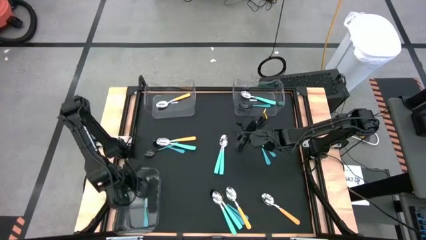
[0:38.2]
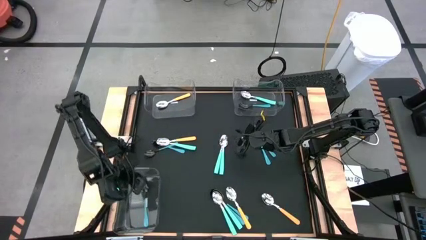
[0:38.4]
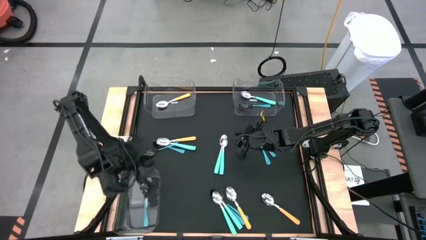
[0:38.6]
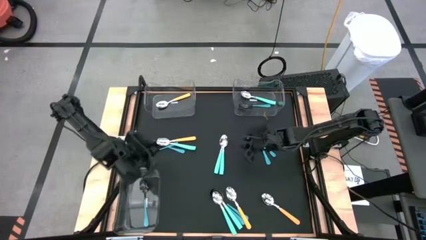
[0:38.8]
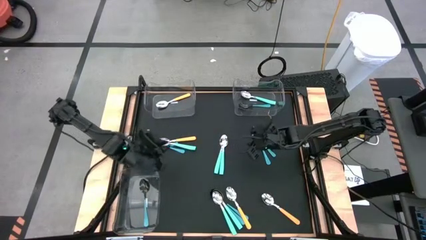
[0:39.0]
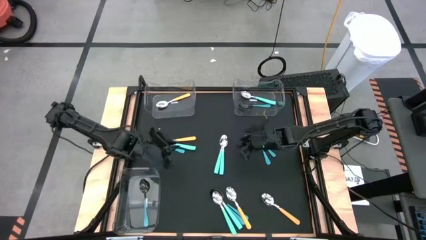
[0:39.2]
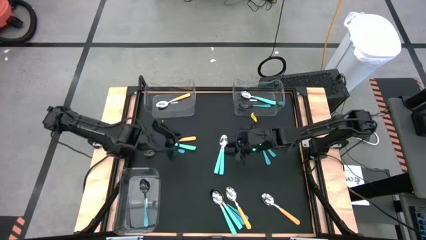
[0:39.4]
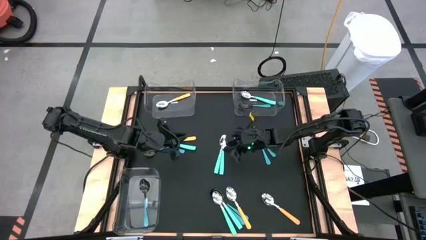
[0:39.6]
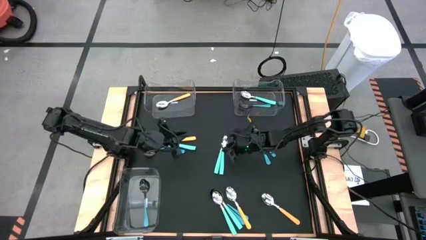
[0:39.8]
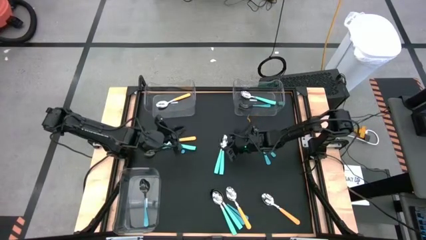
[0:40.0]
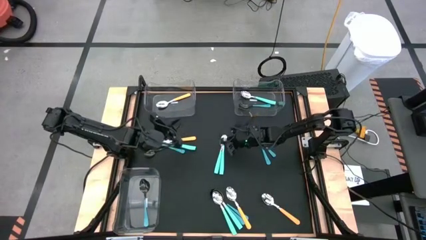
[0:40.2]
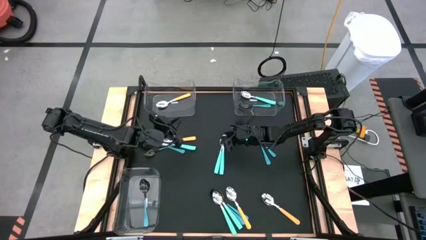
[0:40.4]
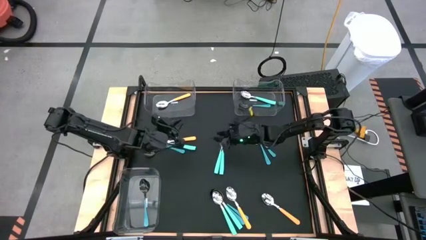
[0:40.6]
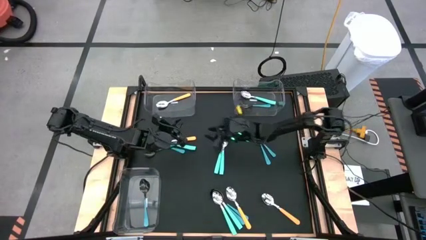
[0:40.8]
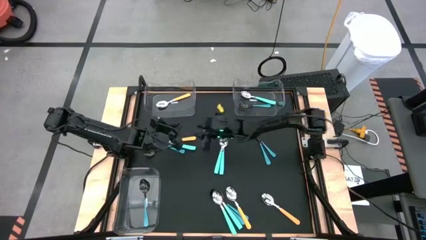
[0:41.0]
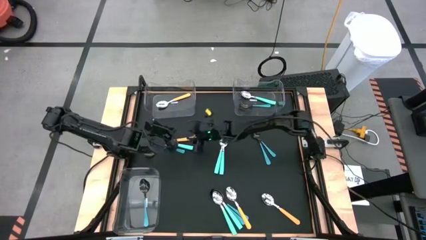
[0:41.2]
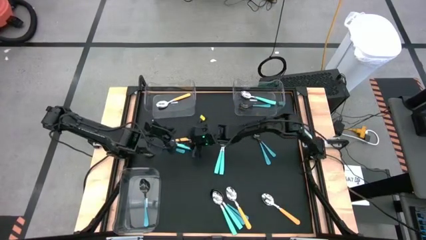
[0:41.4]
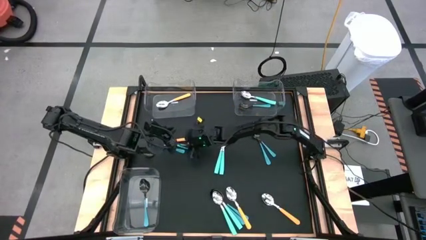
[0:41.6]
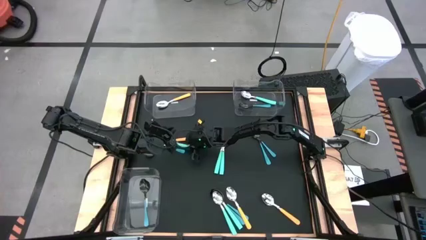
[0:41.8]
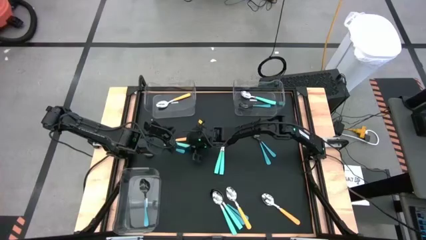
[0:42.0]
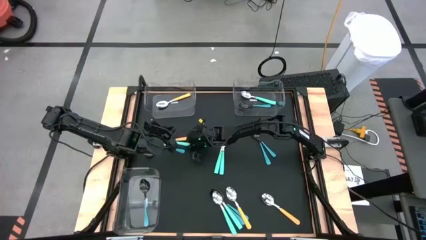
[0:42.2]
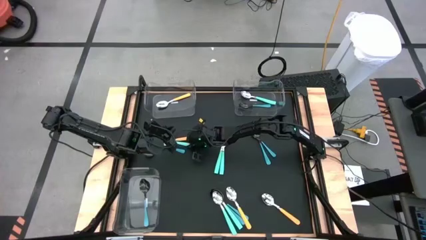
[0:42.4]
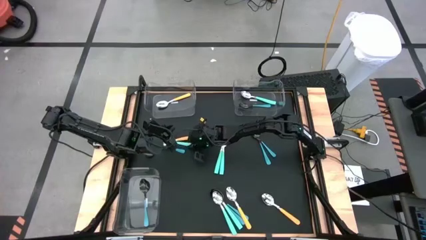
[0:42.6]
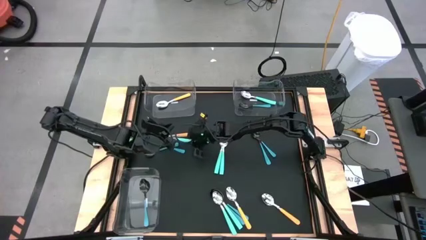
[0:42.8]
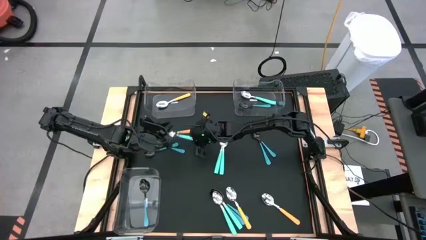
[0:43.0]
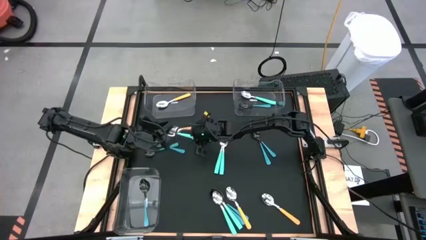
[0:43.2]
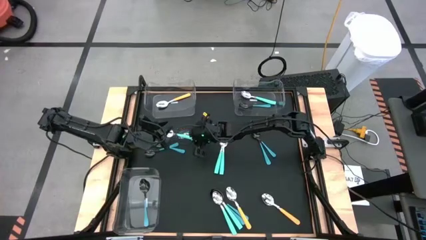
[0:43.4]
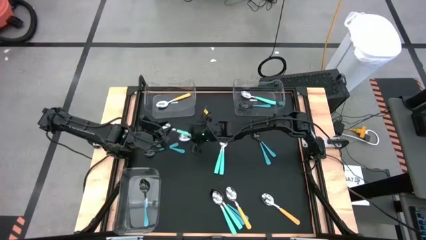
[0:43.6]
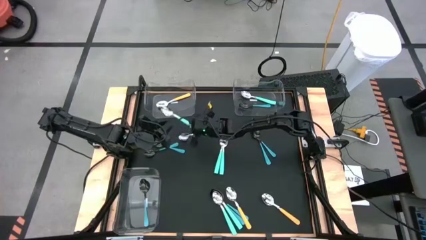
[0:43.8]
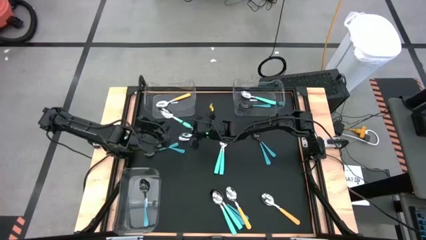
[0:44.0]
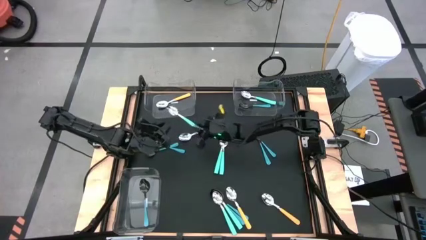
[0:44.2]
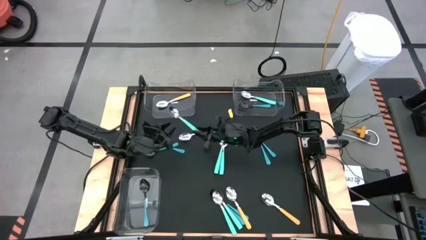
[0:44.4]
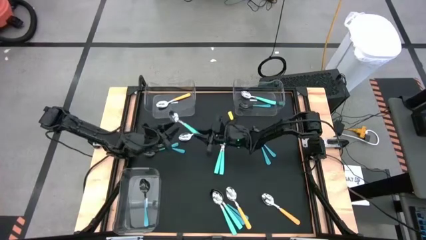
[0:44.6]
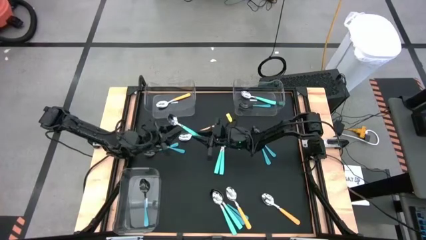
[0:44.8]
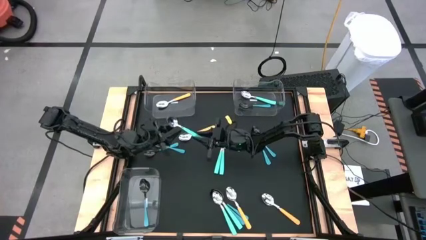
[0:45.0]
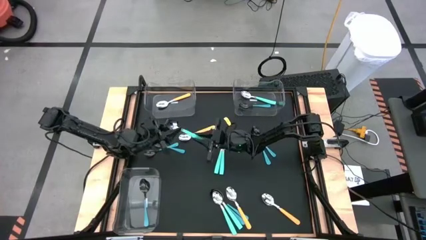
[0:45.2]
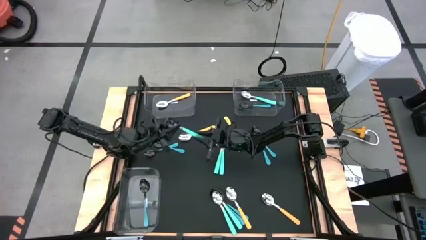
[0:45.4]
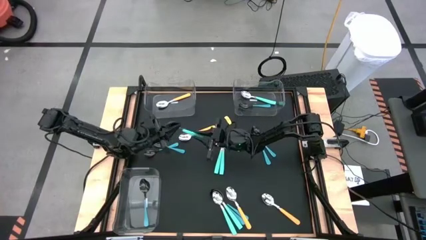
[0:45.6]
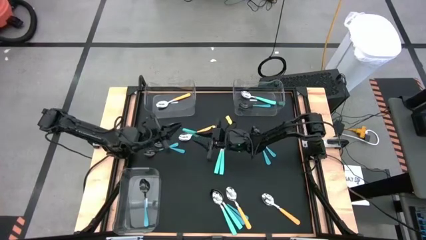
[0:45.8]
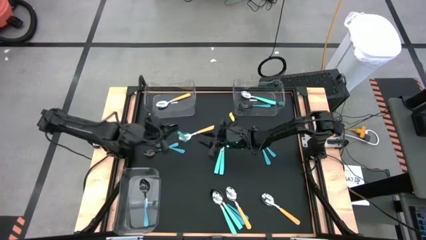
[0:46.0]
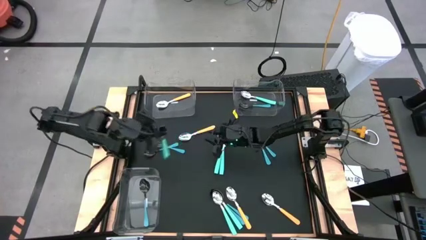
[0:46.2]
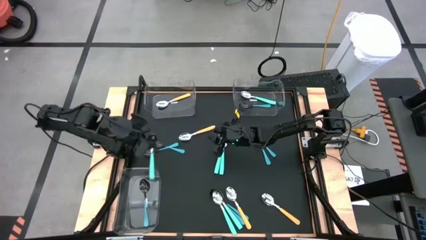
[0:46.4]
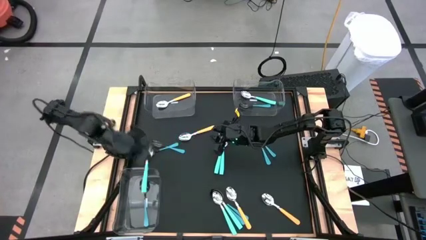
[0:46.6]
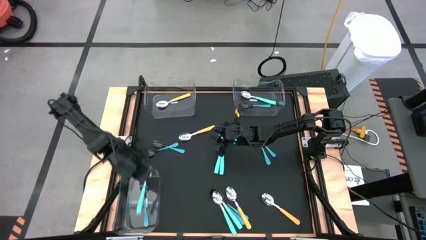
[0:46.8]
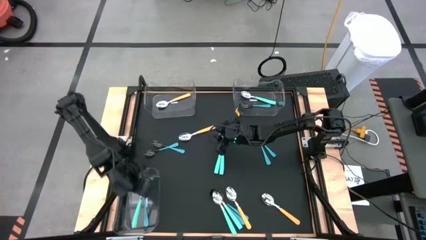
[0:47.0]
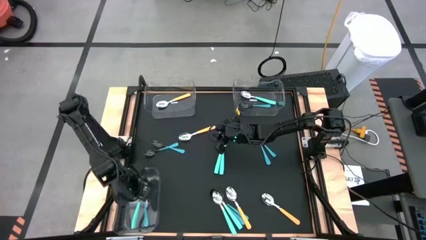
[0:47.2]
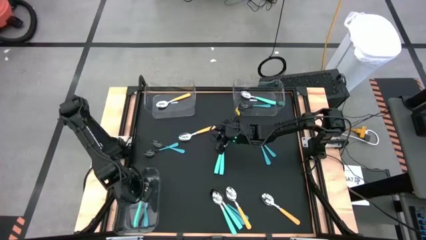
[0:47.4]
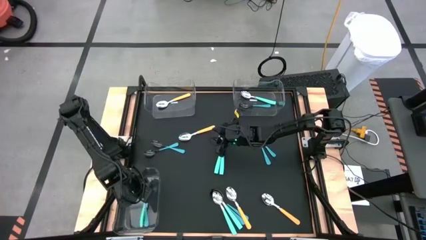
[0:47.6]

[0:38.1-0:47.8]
Task: Sort silverware by color (type)
Put the green spoon into the bottom left transparent bin

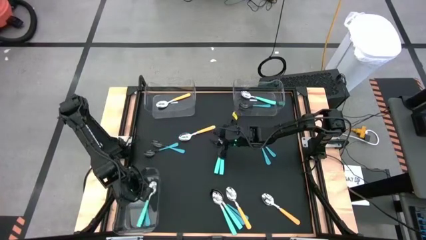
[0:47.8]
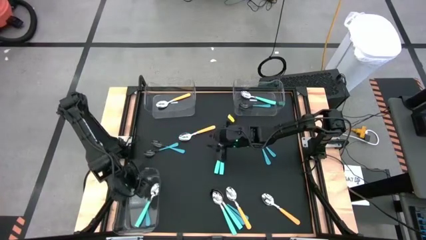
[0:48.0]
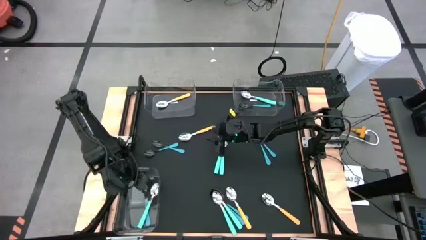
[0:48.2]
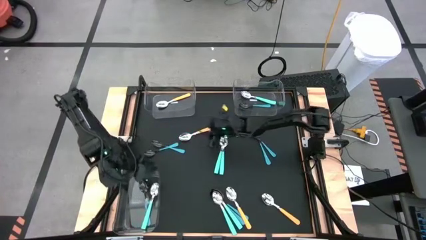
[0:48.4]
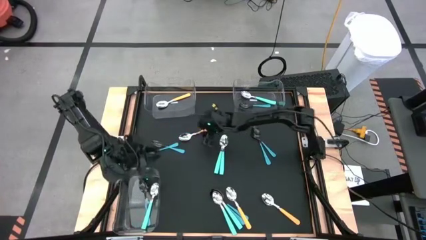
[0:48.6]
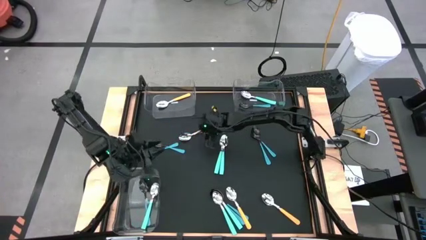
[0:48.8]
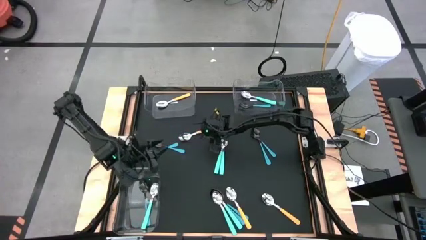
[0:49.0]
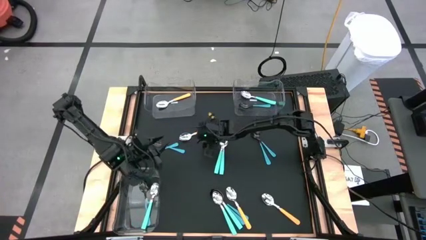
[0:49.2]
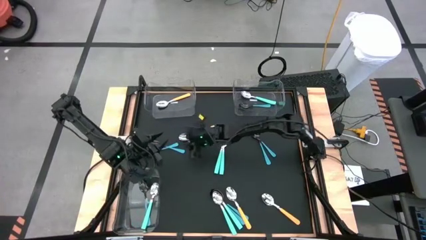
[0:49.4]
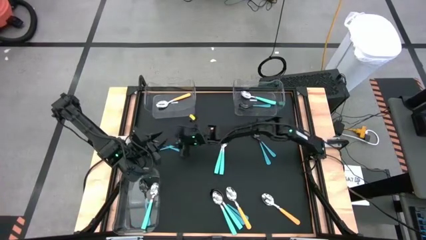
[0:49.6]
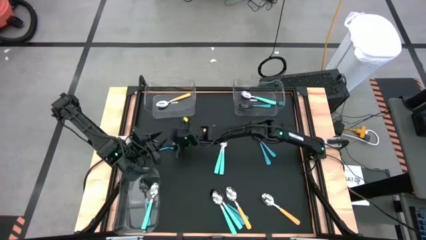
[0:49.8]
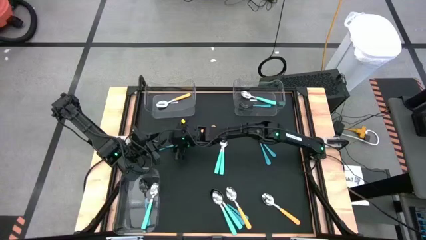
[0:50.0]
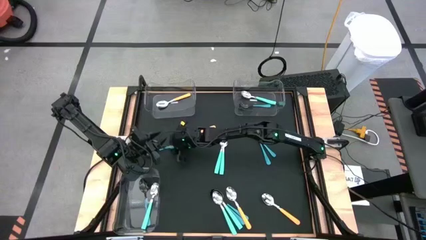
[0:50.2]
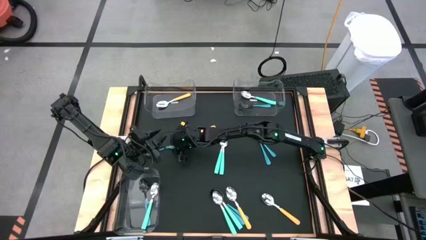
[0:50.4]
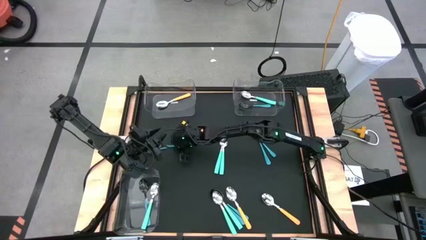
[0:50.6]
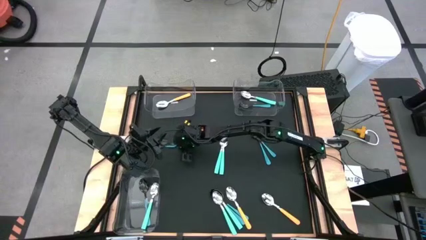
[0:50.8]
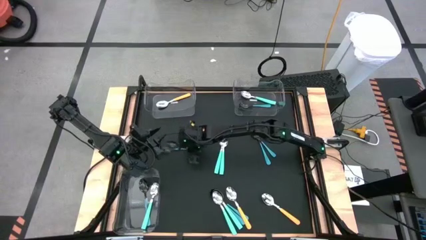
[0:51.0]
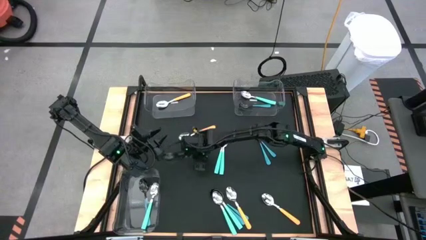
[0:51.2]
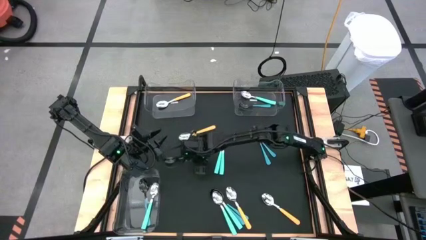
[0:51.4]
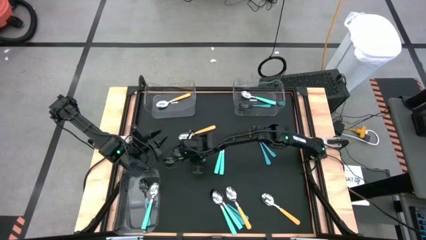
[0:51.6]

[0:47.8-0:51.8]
Put the blue spoon into the top left transparent bin

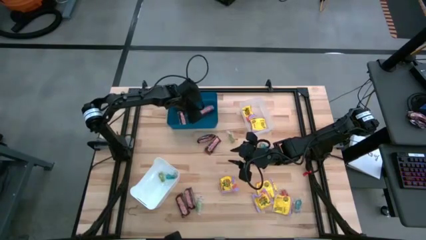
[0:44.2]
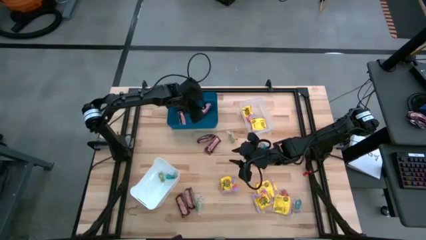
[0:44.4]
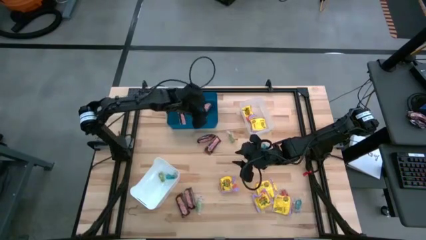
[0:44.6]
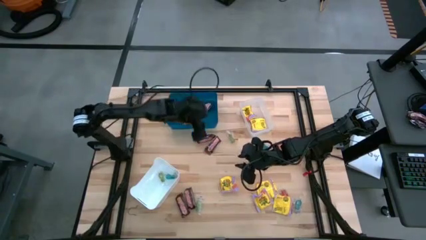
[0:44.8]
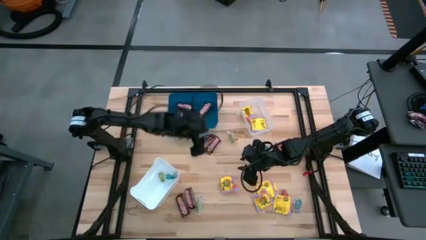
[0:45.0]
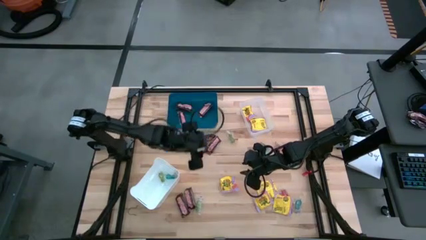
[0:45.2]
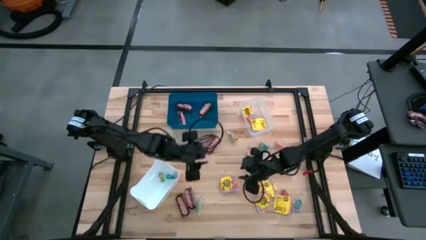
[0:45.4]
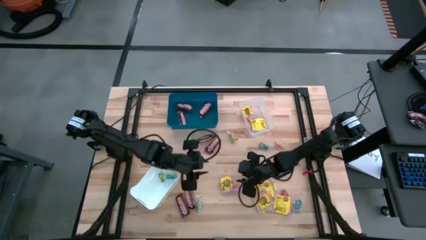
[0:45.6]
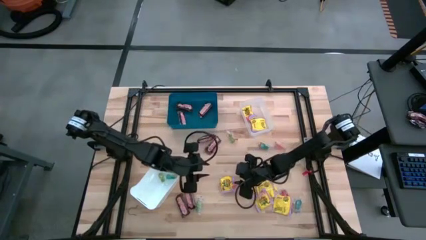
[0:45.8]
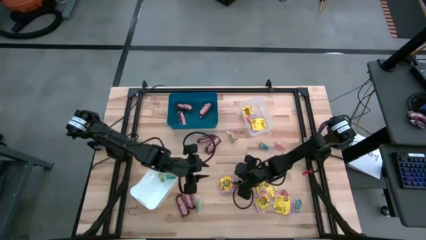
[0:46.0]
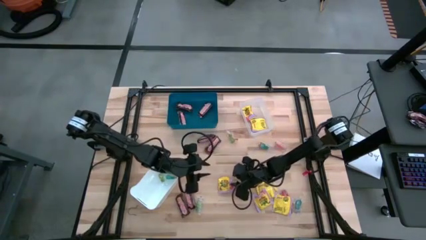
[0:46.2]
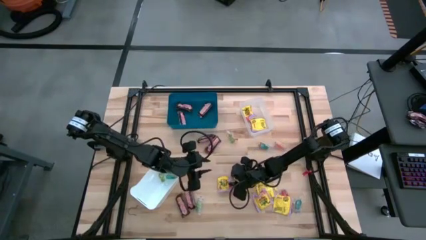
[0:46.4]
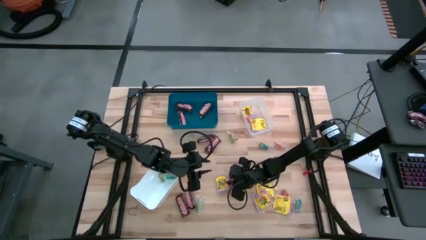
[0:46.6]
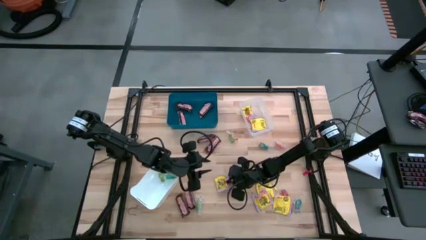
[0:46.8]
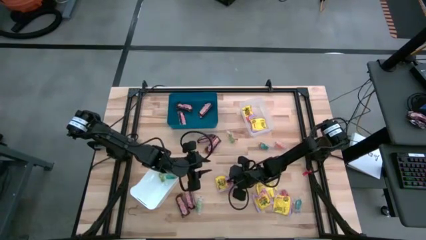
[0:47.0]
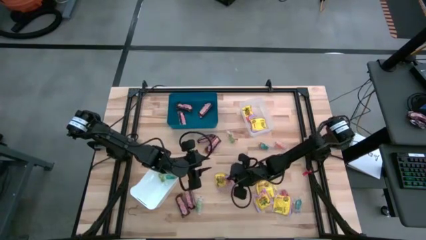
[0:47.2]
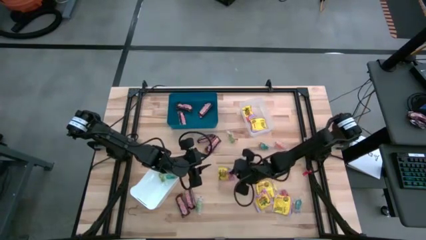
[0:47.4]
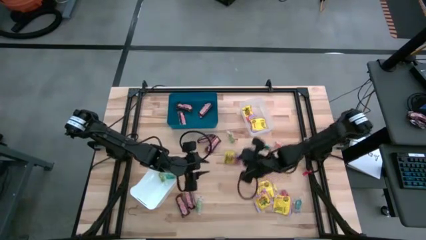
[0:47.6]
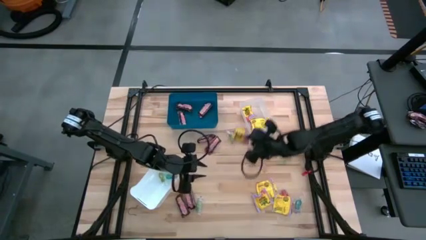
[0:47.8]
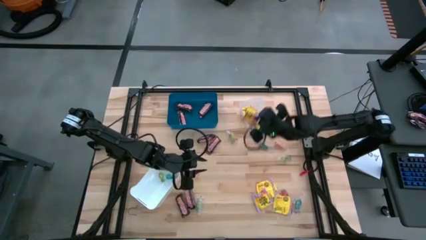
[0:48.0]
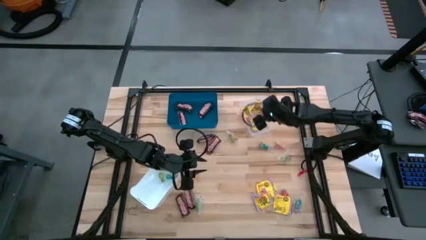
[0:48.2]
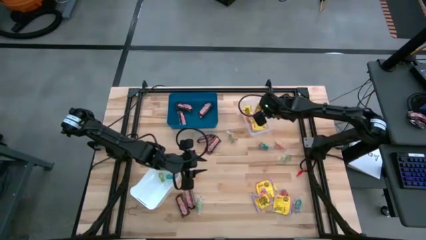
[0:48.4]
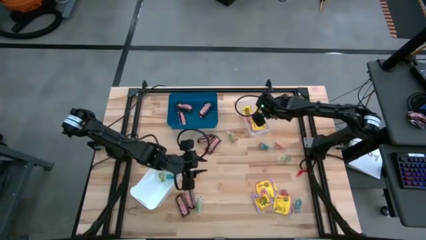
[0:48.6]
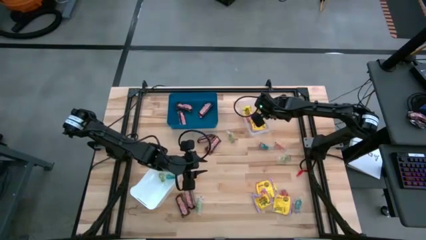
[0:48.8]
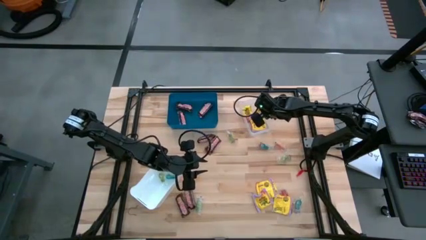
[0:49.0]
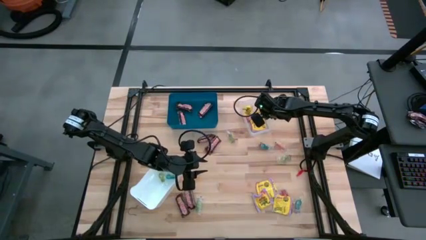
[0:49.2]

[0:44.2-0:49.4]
Task: Sort candy
Put the yellow candy into the transparent bin
